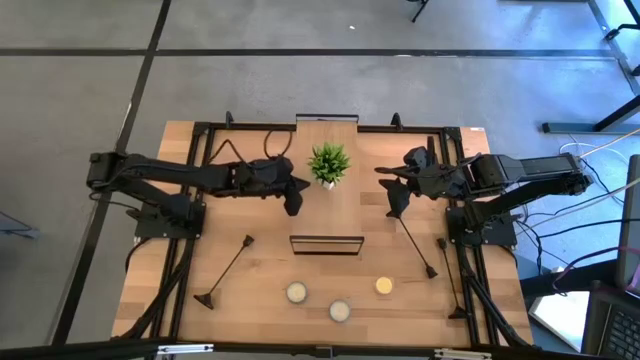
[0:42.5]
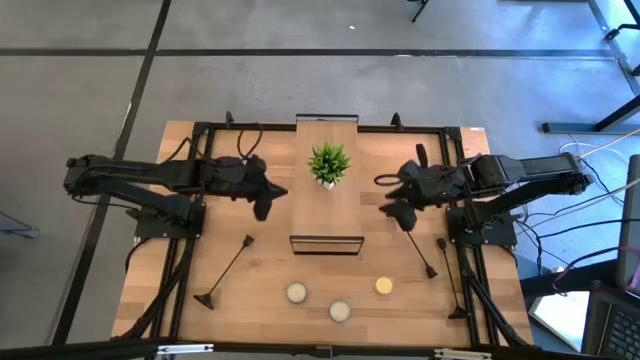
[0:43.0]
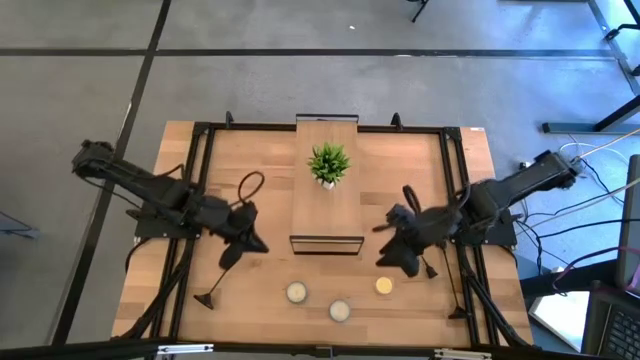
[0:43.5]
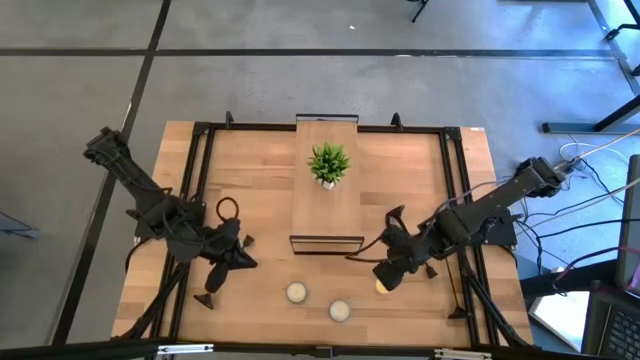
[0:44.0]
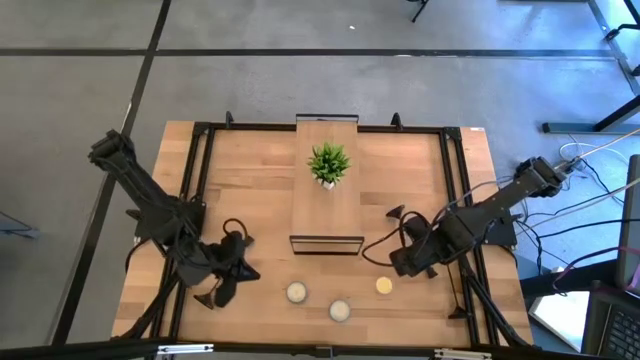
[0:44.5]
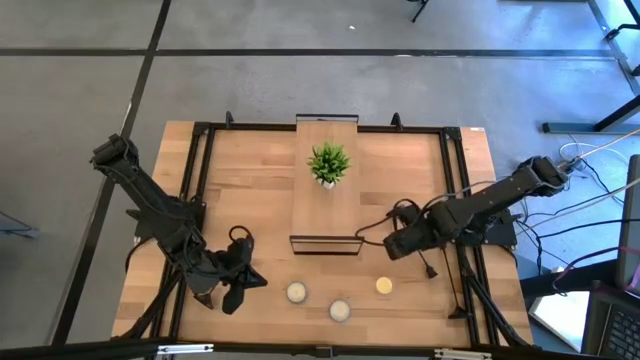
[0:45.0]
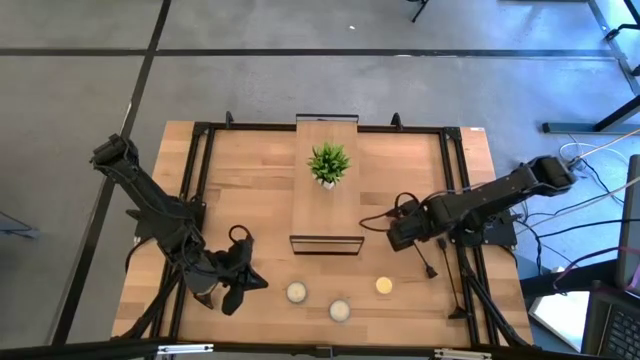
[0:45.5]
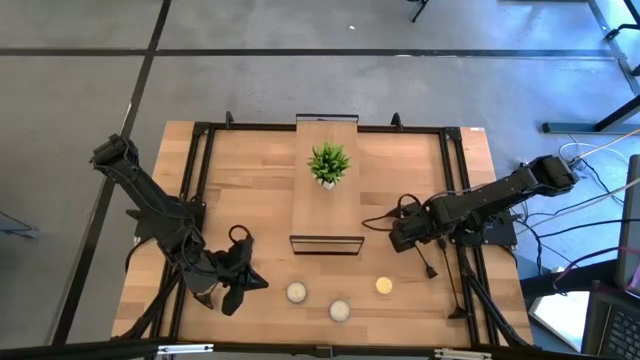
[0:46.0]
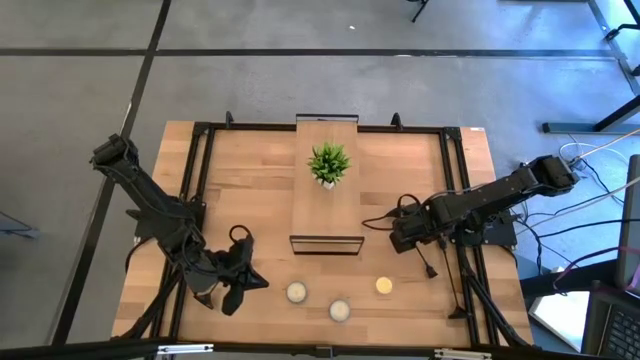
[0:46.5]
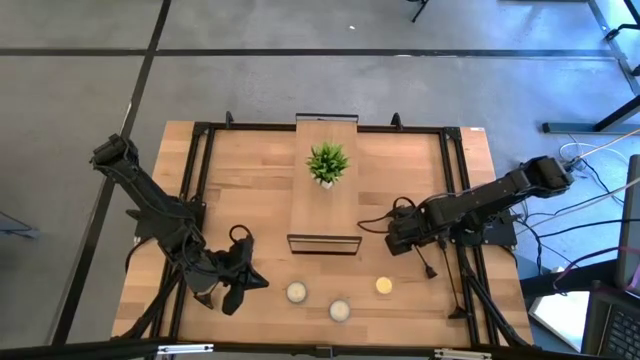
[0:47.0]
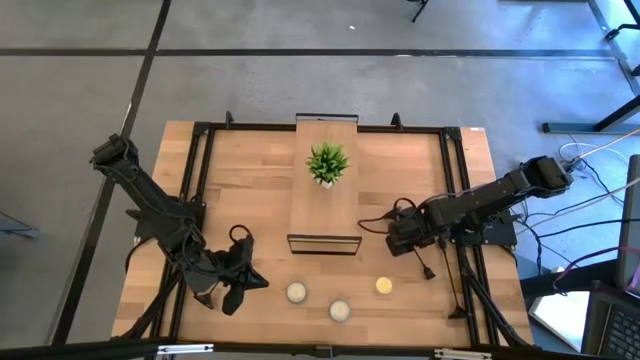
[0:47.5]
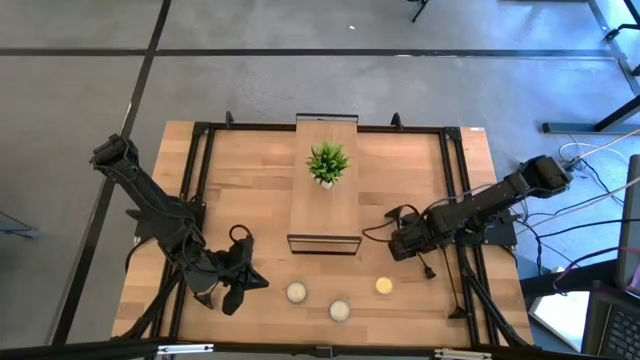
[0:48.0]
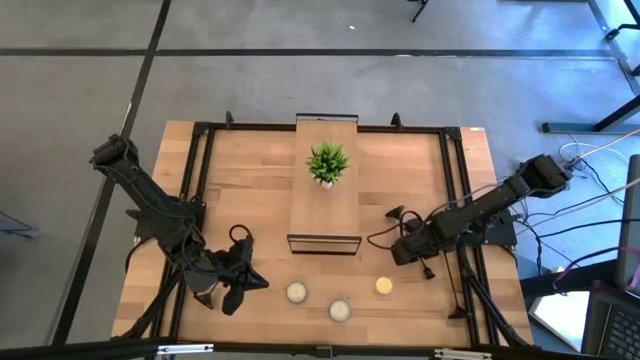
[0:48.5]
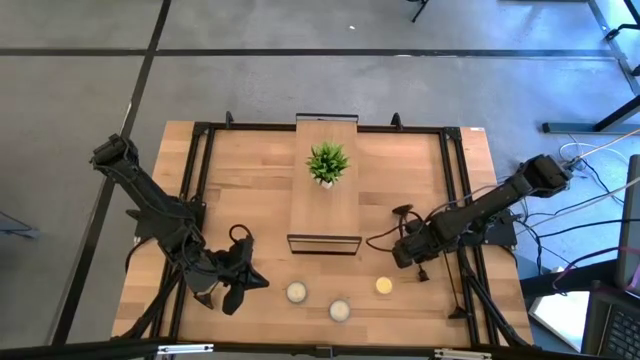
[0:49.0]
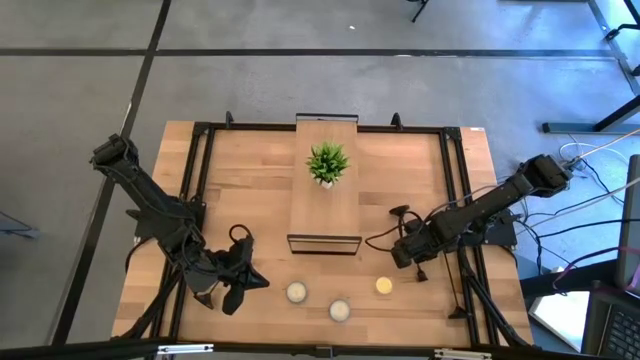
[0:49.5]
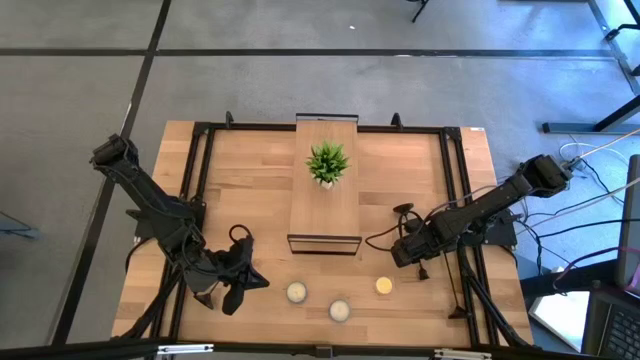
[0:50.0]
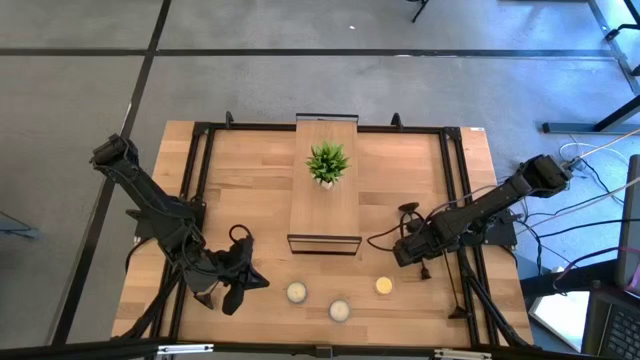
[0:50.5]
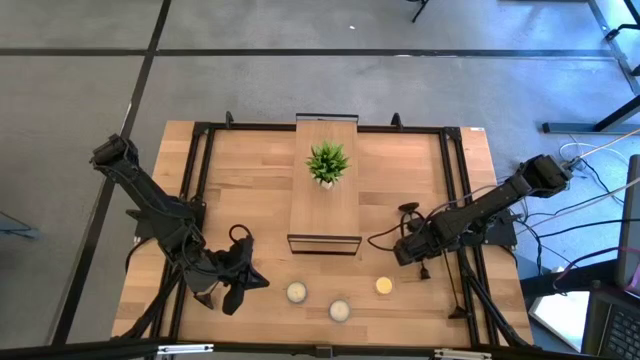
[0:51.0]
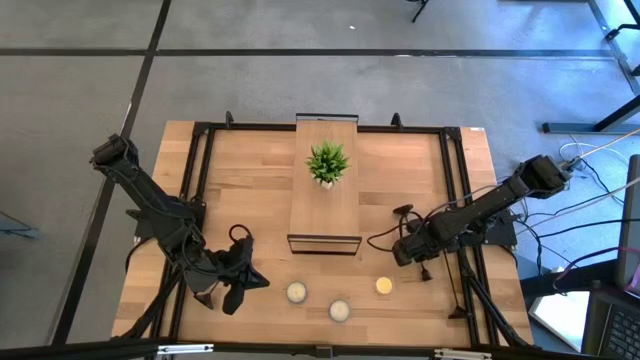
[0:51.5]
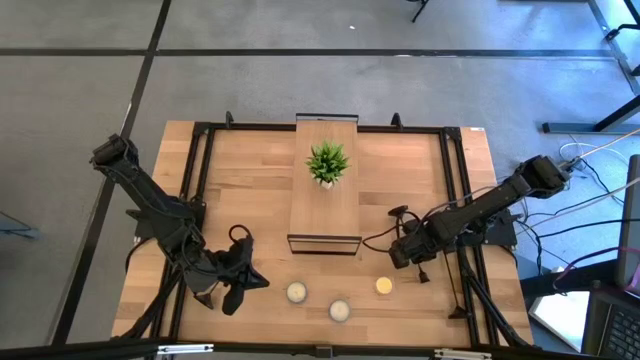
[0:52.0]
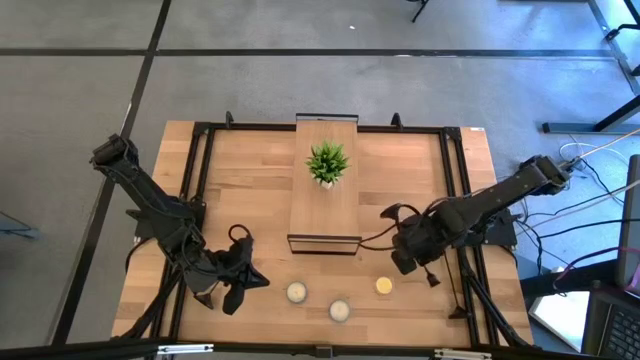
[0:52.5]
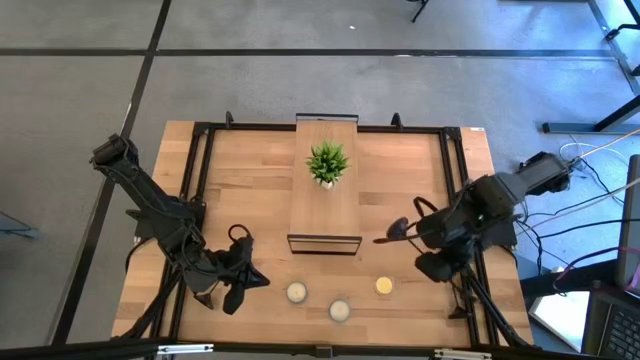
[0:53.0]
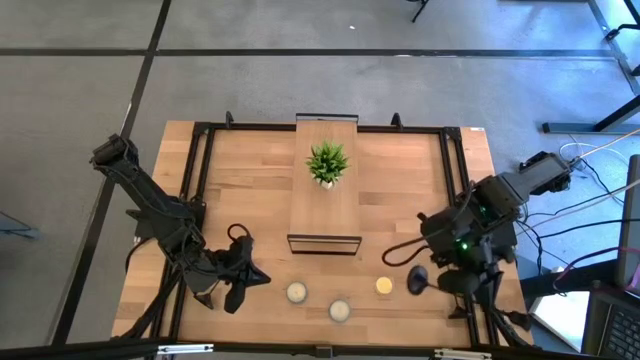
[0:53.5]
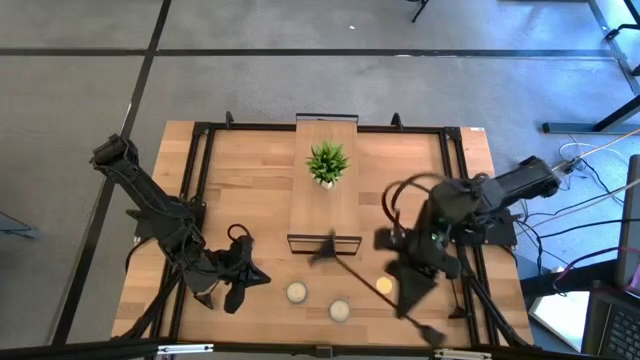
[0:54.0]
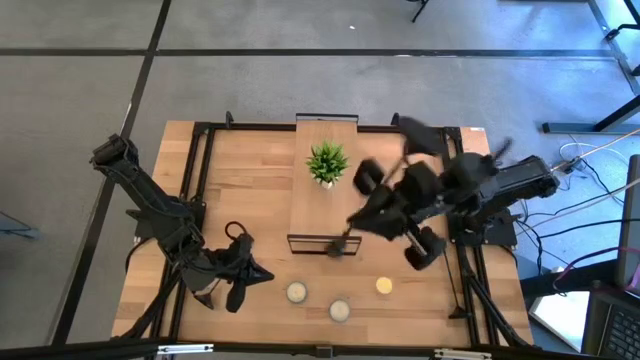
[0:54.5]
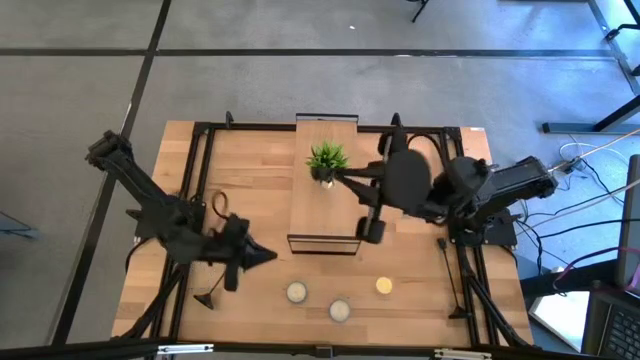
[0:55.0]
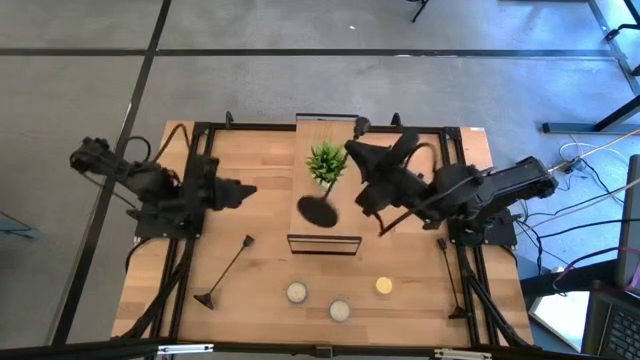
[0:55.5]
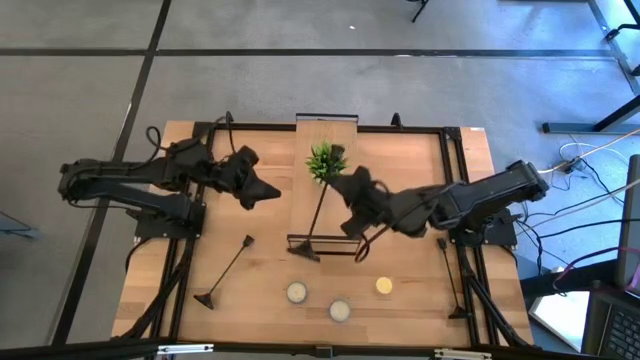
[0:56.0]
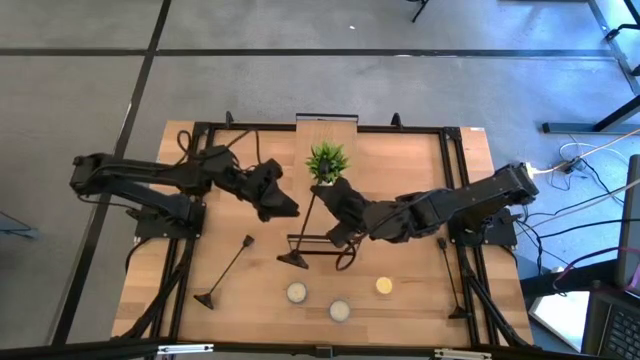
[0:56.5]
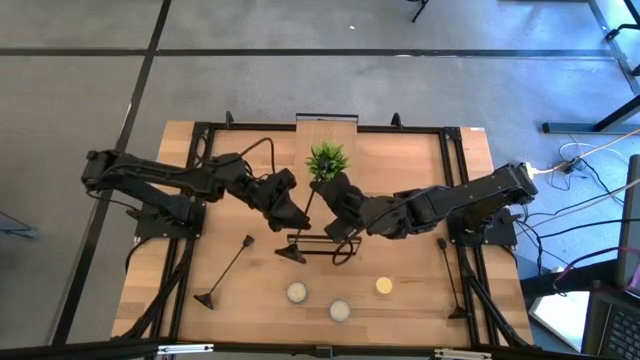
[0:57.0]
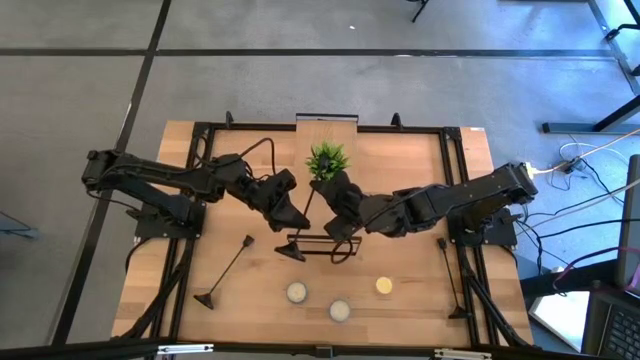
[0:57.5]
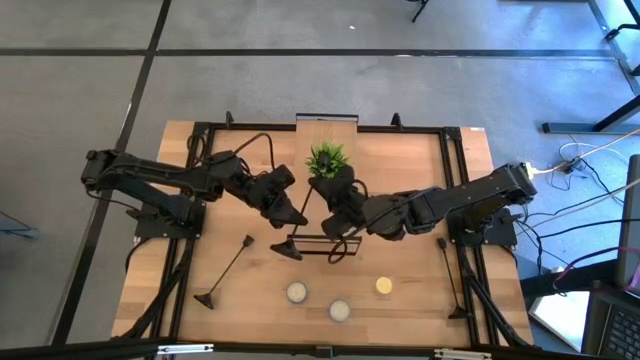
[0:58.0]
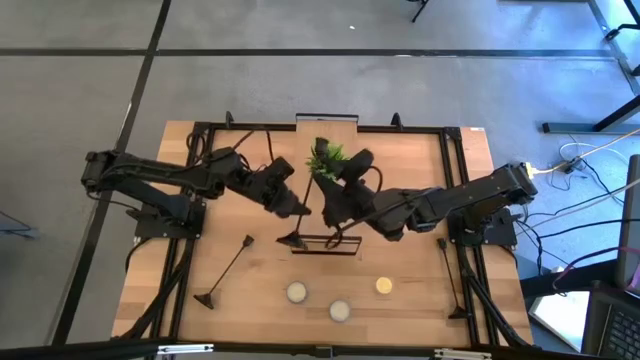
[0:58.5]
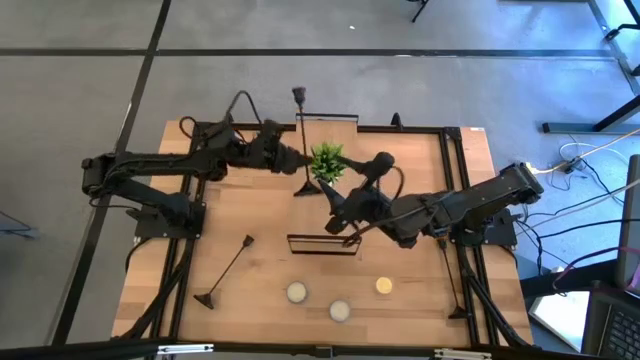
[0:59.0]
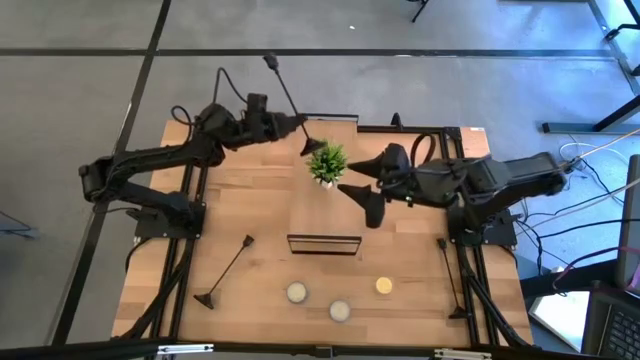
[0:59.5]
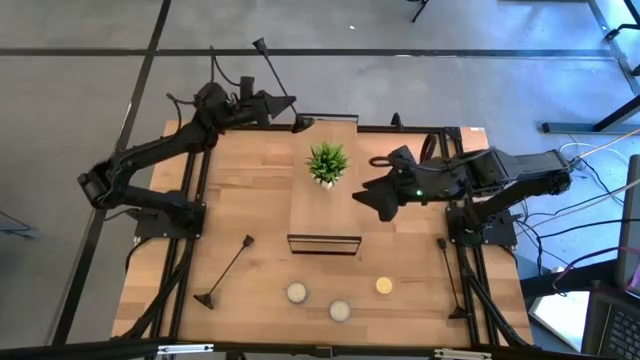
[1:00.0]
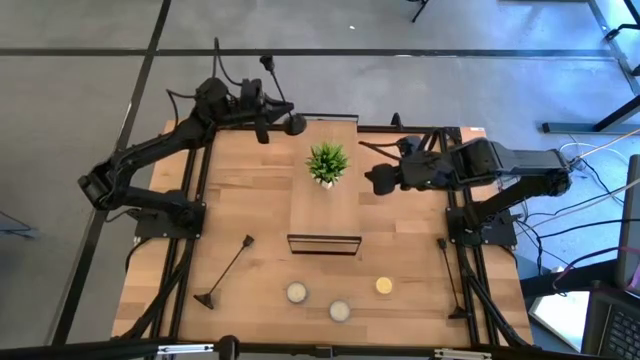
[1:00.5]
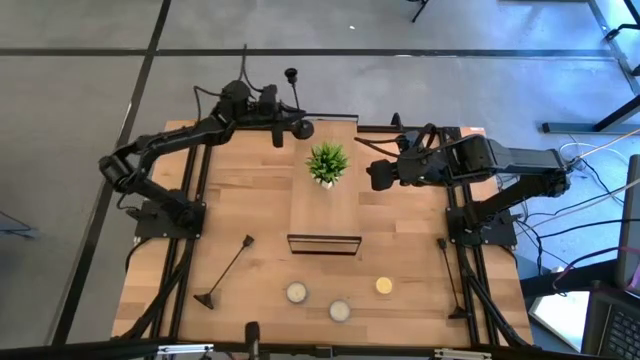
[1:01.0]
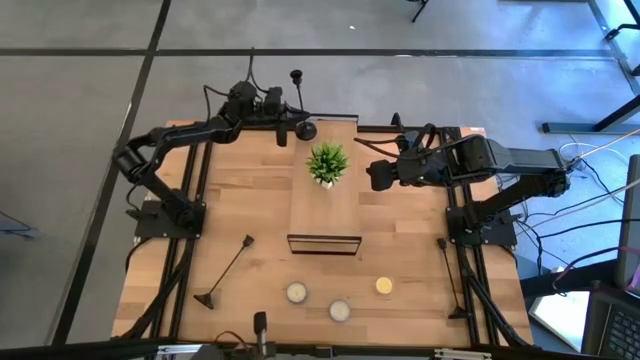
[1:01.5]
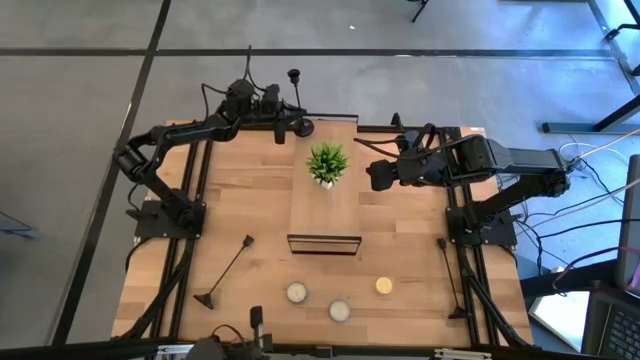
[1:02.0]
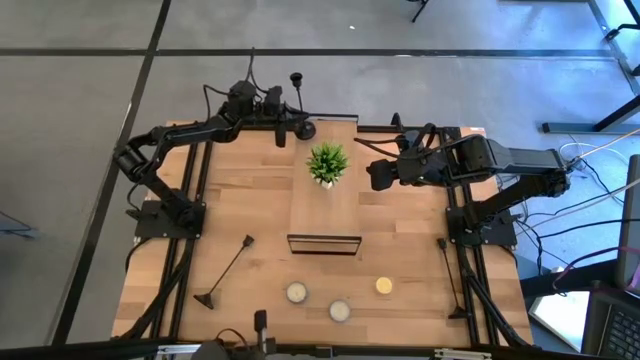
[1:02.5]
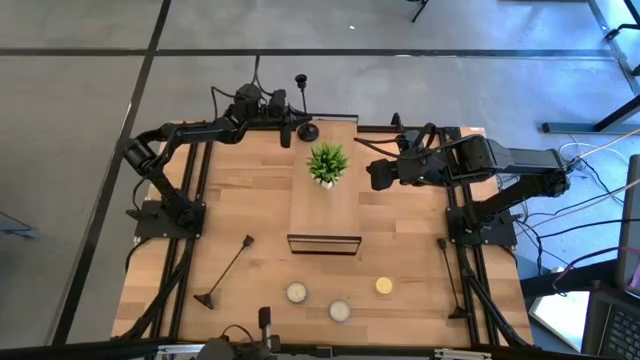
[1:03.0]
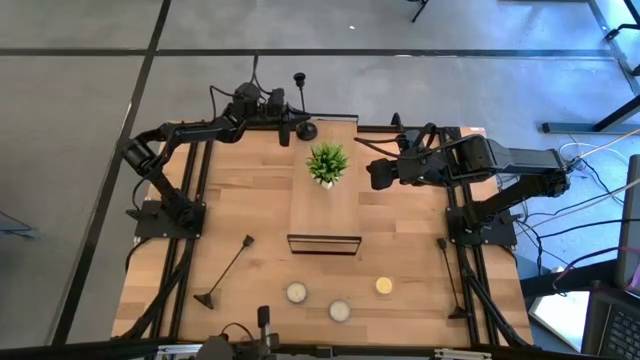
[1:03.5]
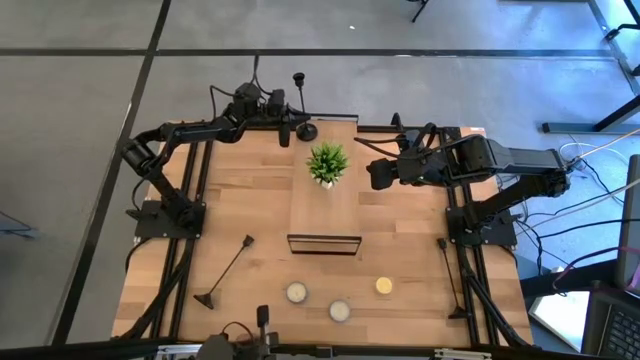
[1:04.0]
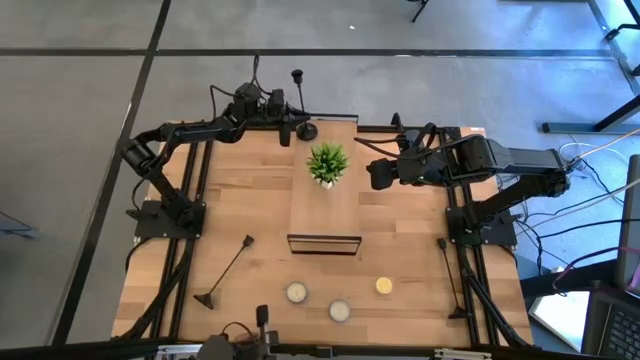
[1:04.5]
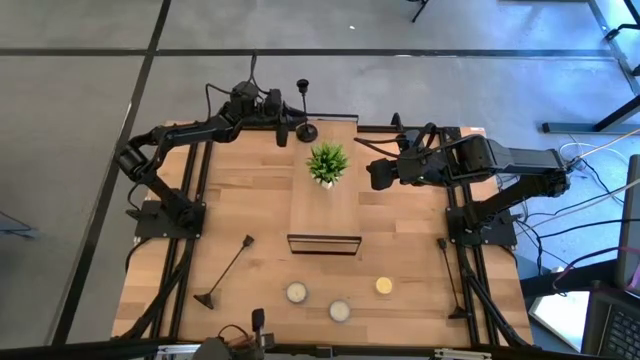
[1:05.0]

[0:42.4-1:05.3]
Task: Pick & Place candle stick holders
Put the middle candle holder on the shelf
